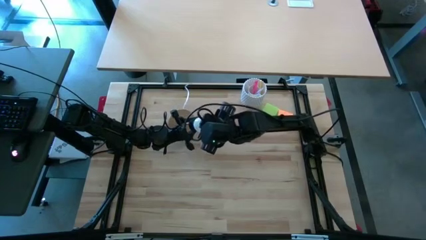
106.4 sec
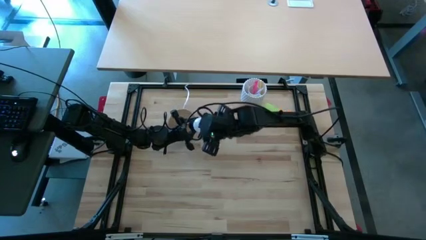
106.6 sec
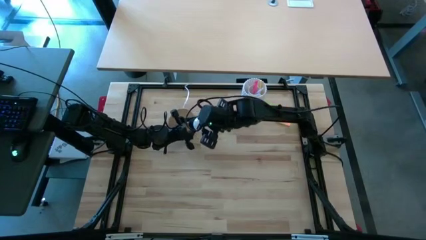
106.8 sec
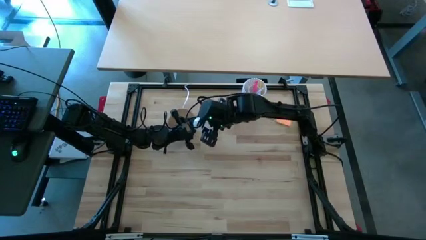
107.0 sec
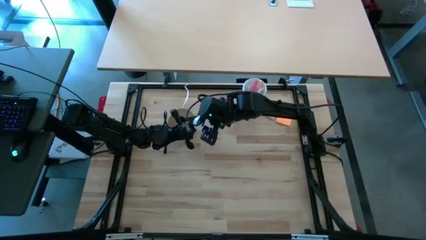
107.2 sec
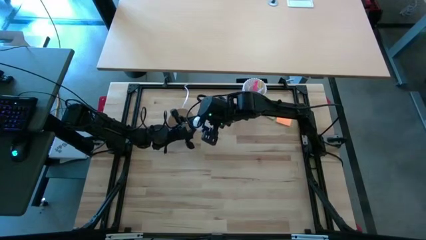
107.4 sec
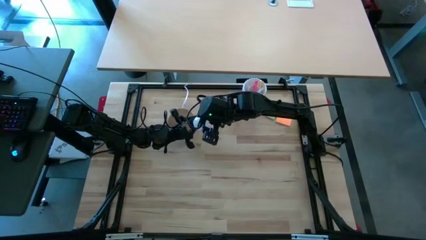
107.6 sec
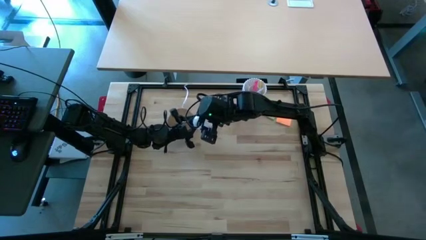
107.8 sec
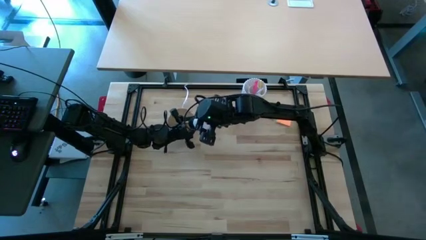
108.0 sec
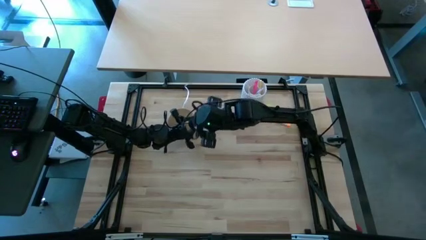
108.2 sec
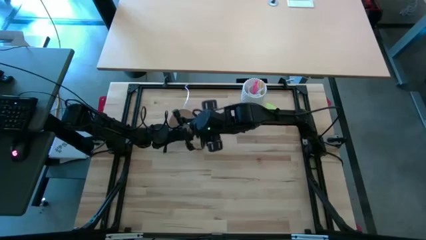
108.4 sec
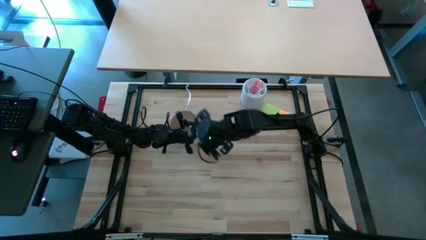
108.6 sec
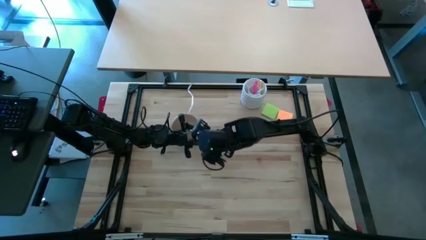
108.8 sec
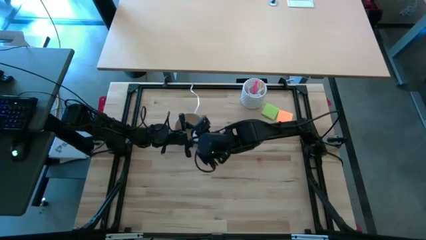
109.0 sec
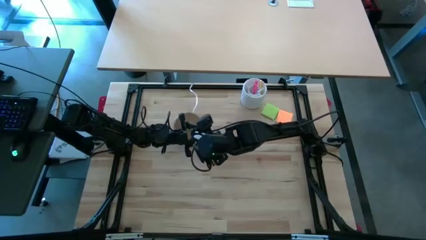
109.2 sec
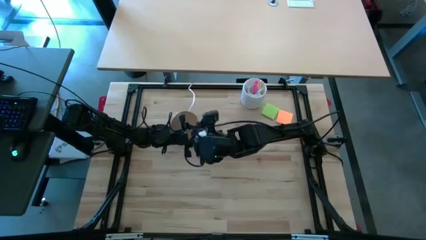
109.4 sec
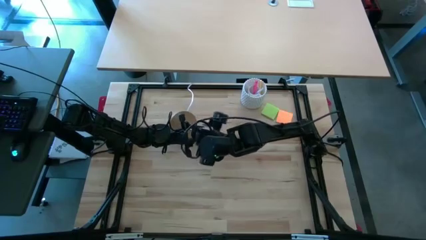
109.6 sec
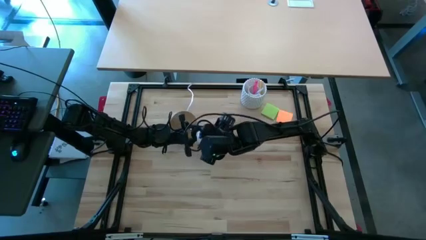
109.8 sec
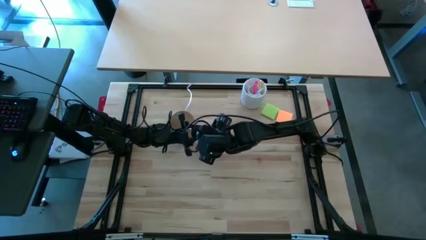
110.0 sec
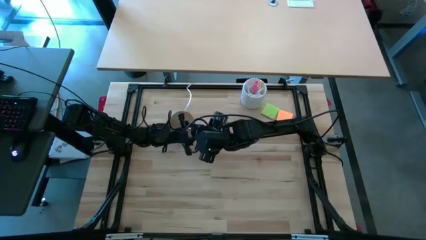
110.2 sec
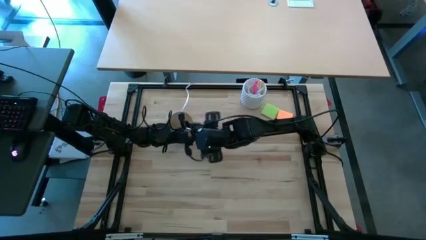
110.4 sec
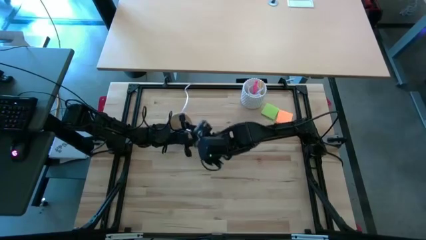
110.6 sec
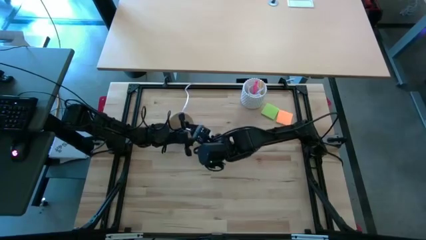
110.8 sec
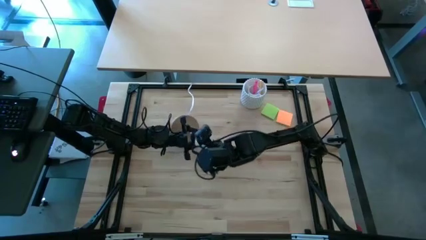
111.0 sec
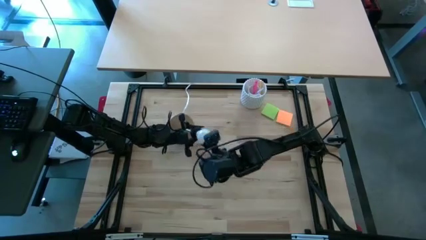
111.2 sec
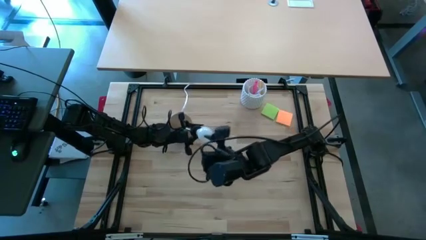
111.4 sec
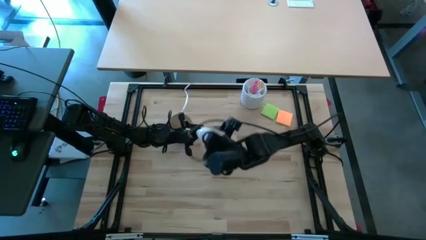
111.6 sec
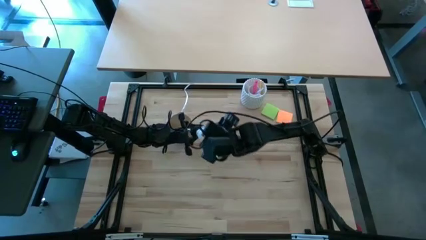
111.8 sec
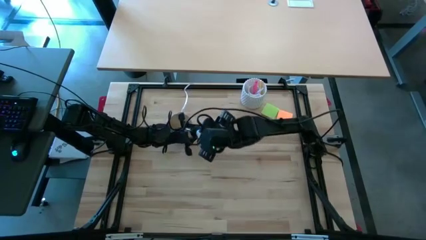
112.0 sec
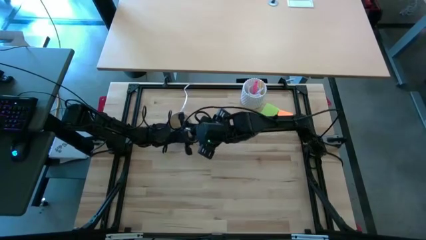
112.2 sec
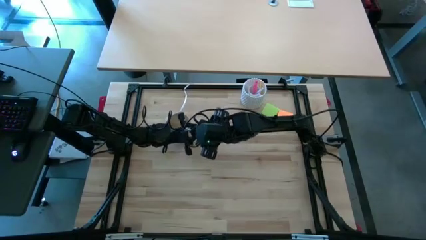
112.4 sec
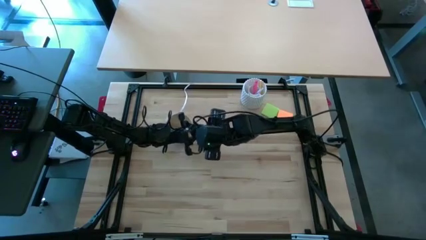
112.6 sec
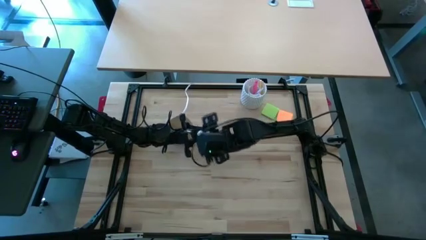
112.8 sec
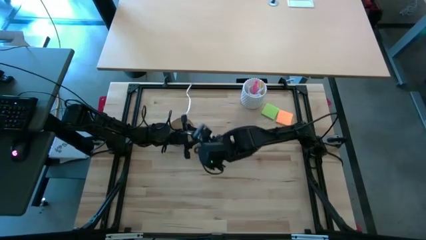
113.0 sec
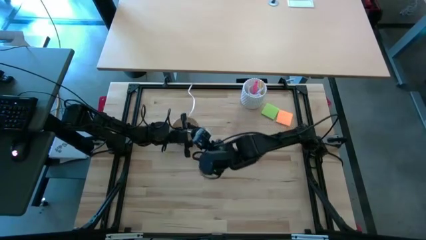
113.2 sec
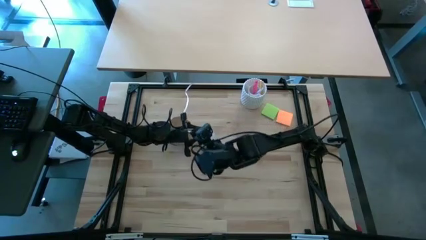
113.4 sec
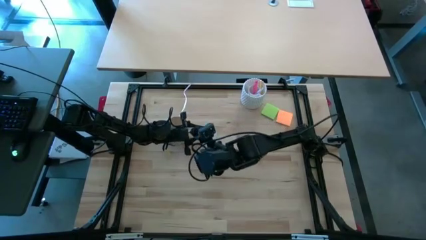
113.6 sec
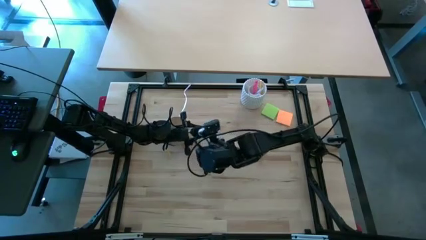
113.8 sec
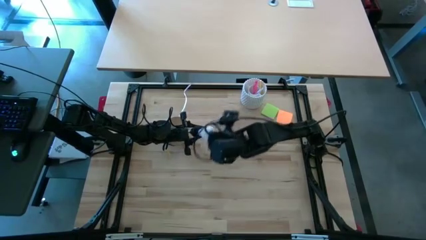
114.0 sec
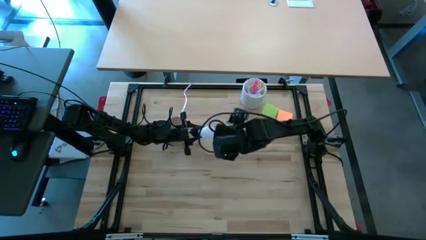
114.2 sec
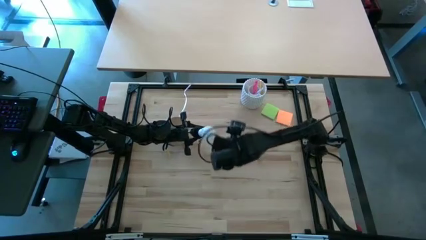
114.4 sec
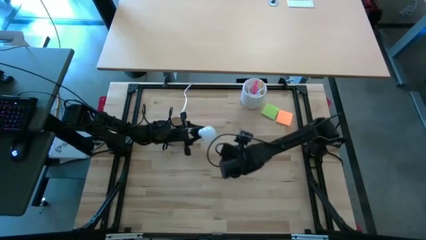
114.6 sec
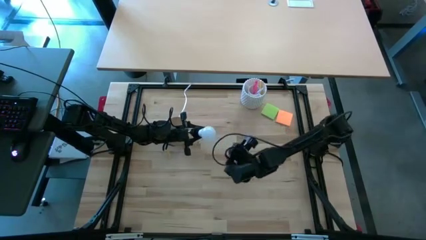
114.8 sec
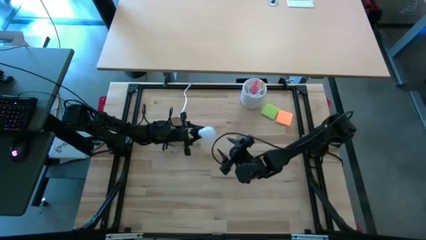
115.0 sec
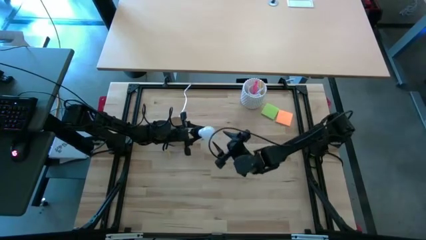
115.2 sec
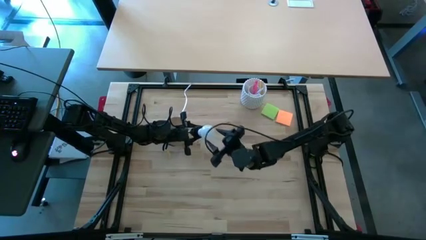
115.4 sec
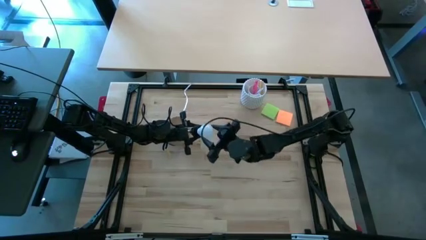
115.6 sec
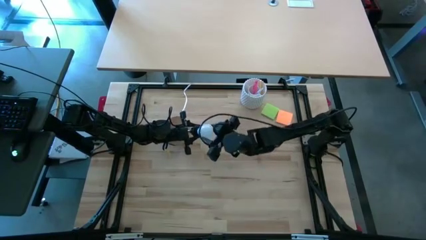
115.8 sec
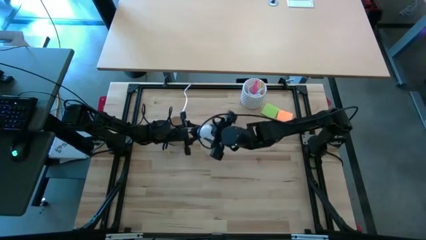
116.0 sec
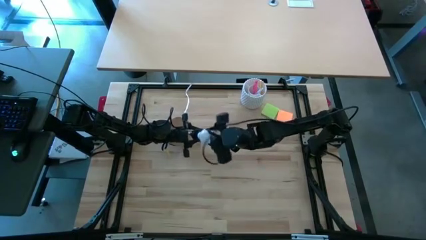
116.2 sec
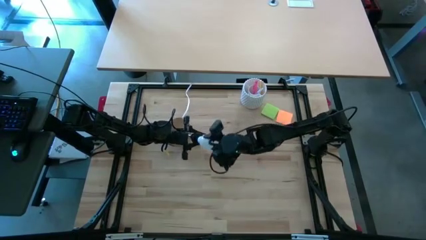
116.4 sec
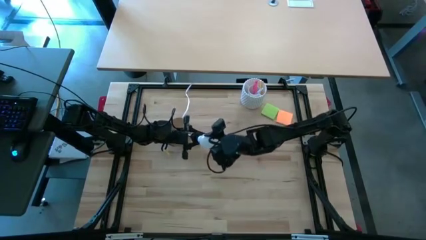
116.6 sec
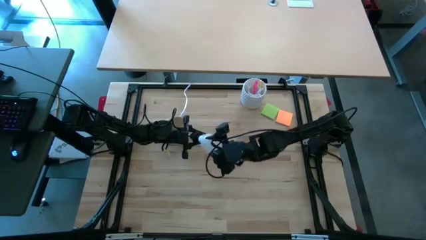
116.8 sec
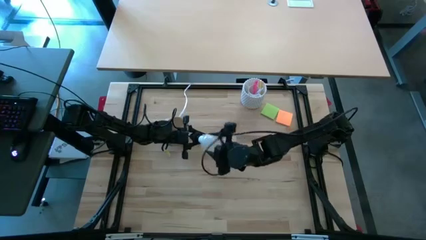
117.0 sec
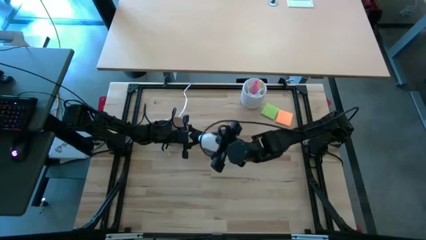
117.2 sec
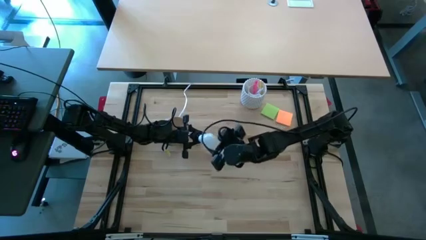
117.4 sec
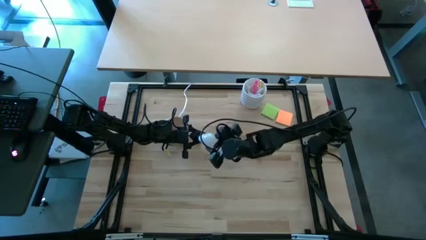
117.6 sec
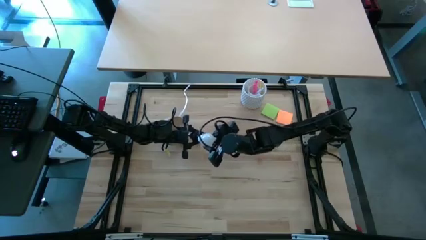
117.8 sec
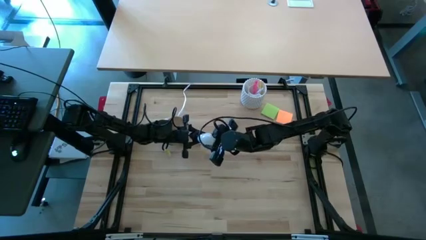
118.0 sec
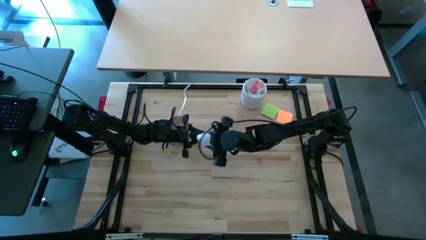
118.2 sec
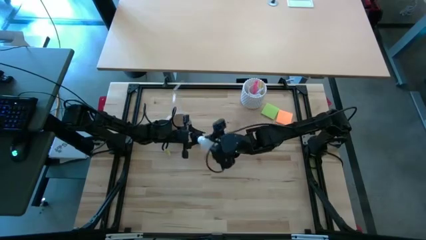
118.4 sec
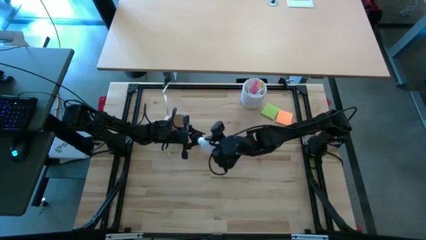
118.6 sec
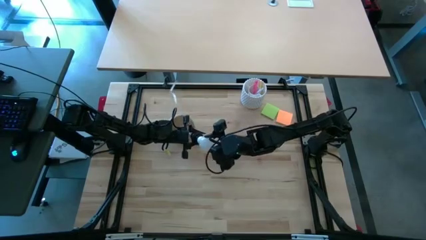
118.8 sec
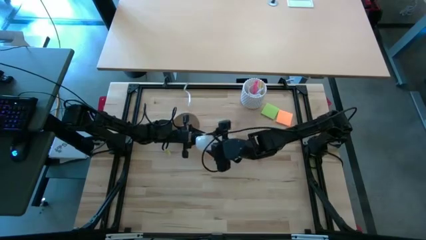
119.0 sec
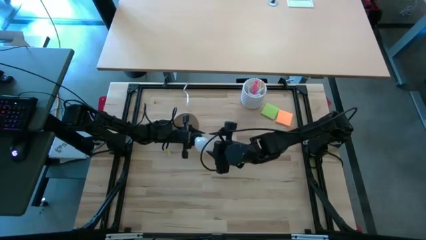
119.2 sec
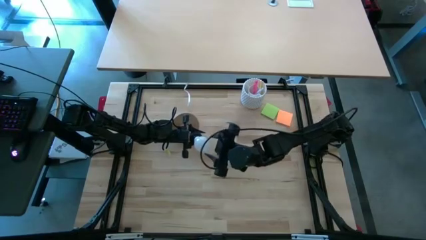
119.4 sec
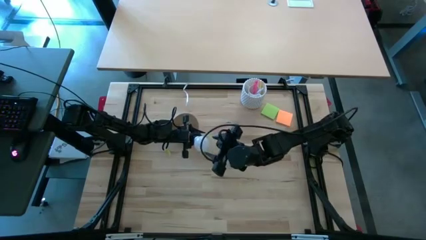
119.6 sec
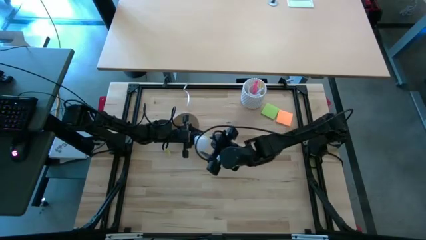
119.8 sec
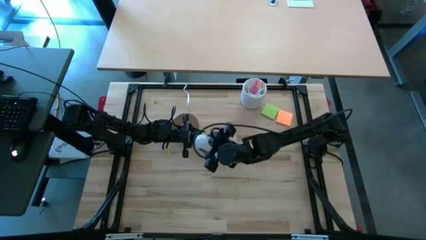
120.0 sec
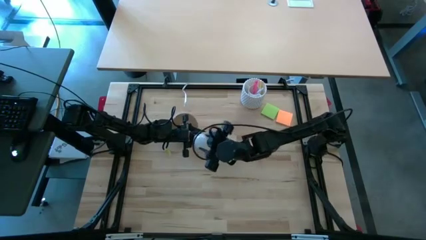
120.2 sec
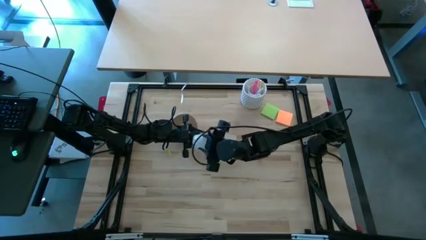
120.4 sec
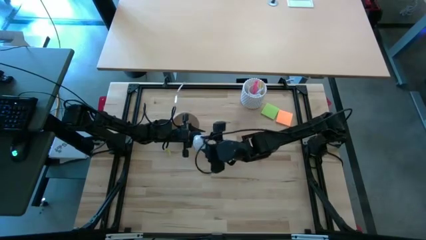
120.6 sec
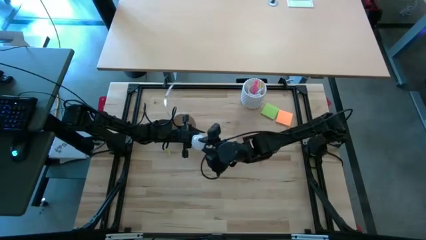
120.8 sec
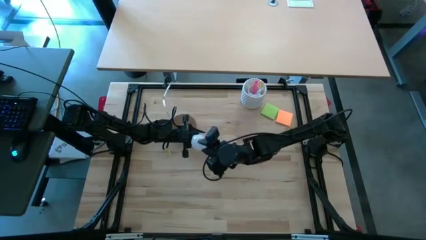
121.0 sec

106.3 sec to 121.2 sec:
Task: Screw lightbulb
Remove the white lightbulb from the desk lamp

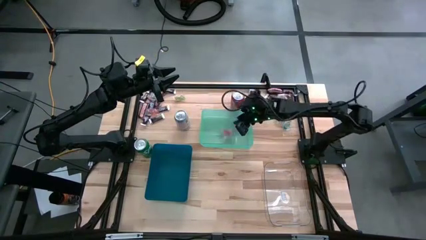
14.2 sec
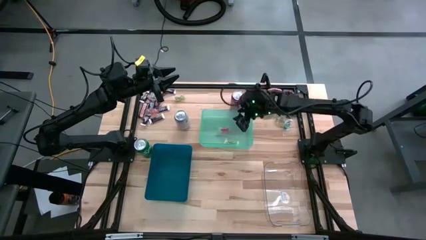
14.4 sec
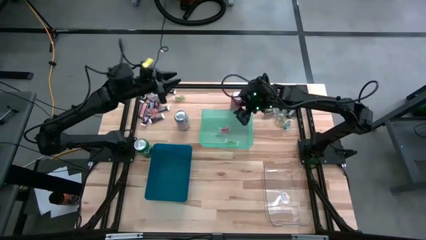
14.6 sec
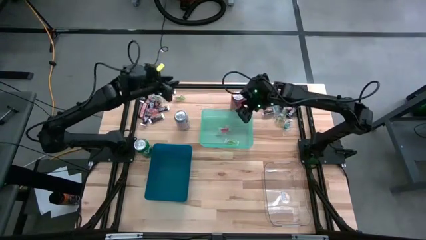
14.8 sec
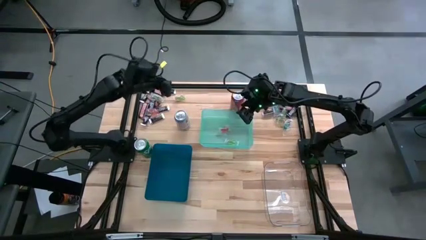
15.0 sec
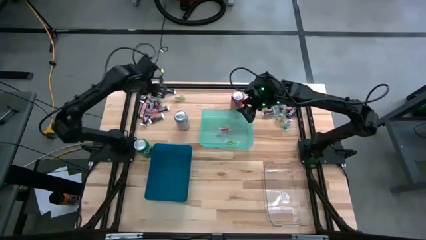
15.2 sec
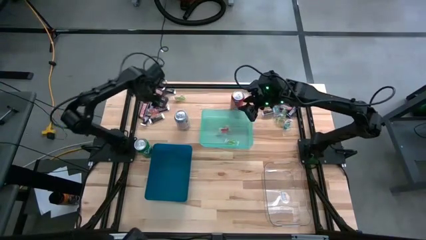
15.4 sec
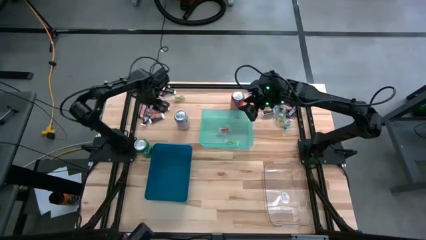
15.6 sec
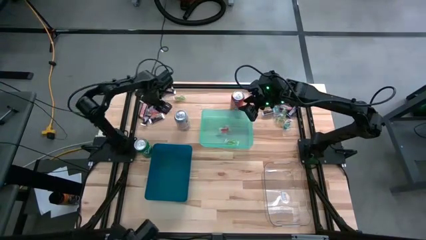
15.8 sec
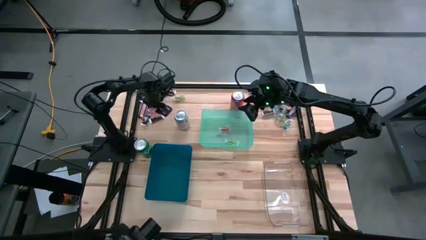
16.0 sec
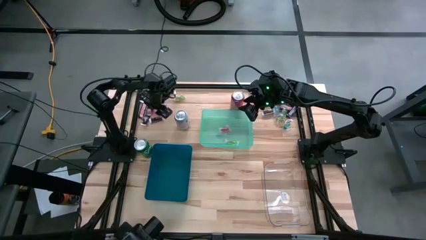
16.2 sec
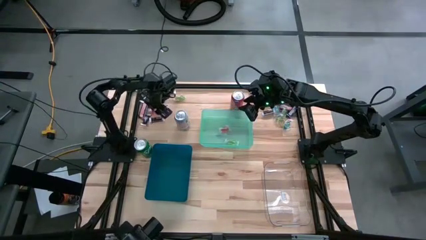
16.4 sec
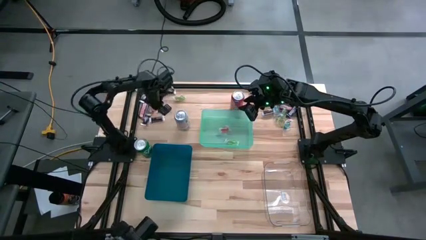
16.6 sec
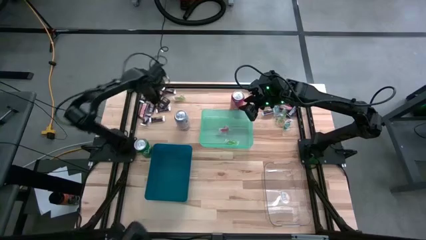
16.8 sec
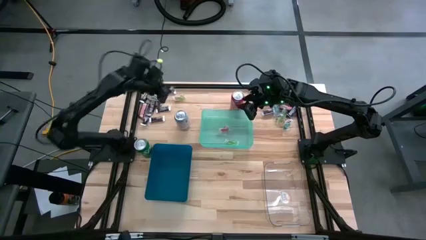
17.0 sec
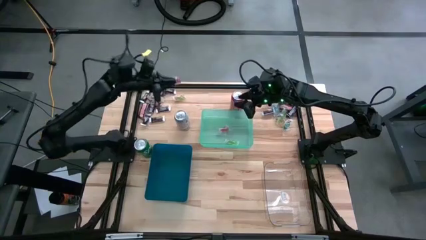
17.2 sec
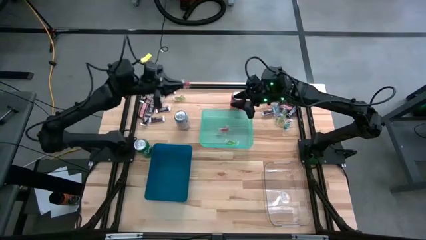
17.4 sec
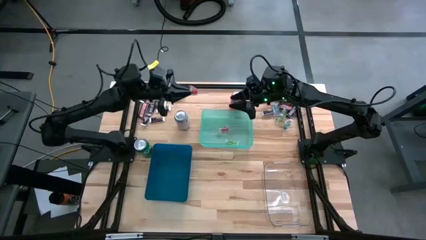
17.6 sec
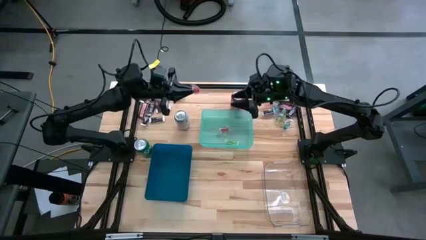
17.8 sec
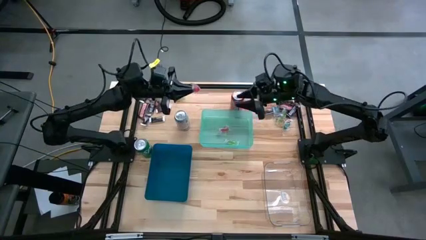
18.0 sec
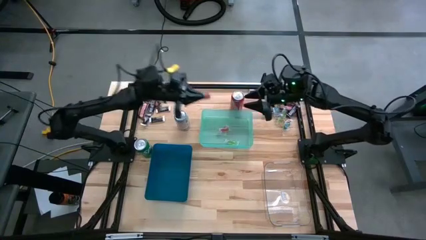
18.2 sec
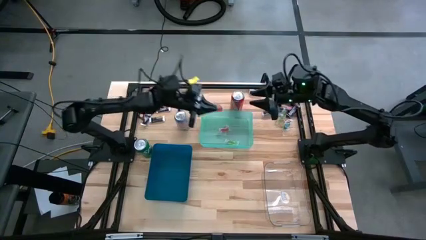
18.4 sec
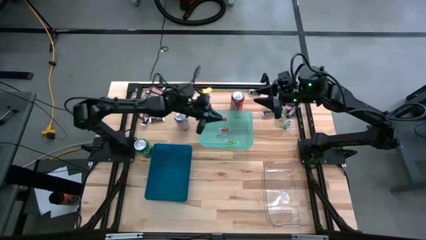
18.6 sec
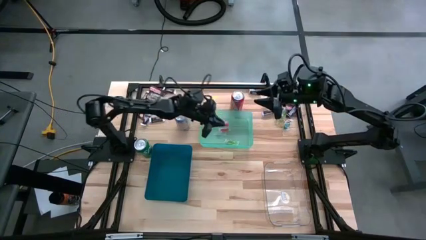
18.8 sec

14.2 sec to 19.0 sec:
Task: Organize candy in baskets
Put the red gummy into the green bin
